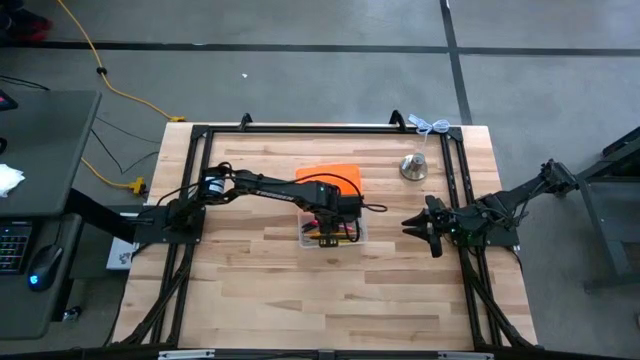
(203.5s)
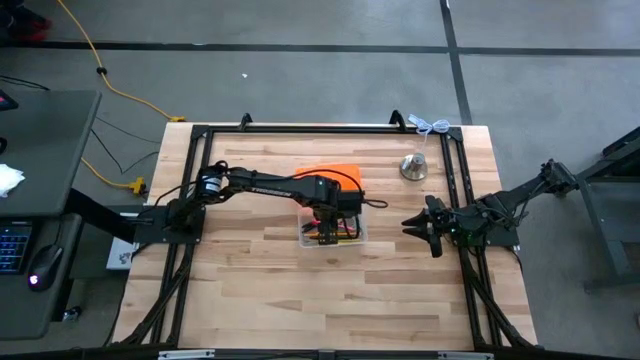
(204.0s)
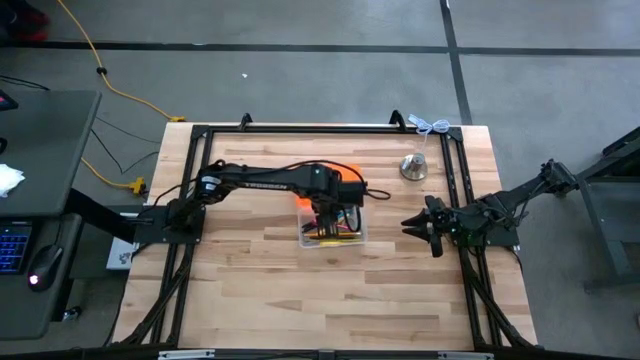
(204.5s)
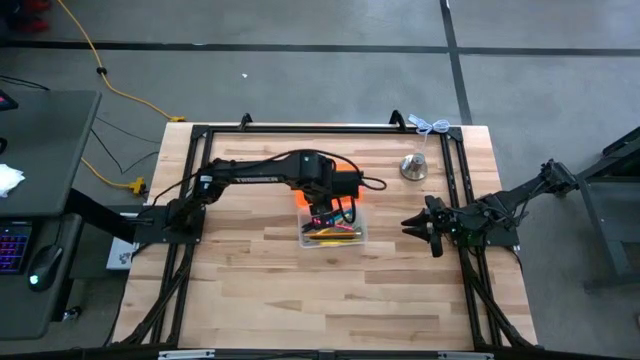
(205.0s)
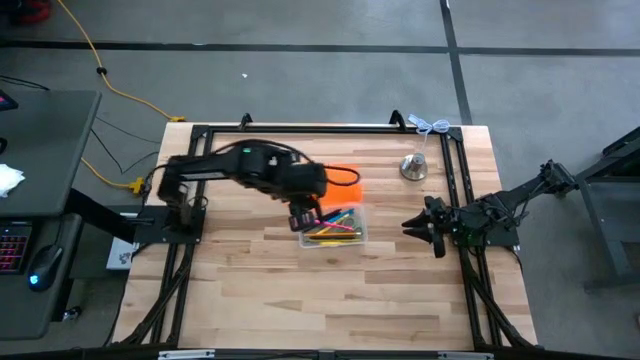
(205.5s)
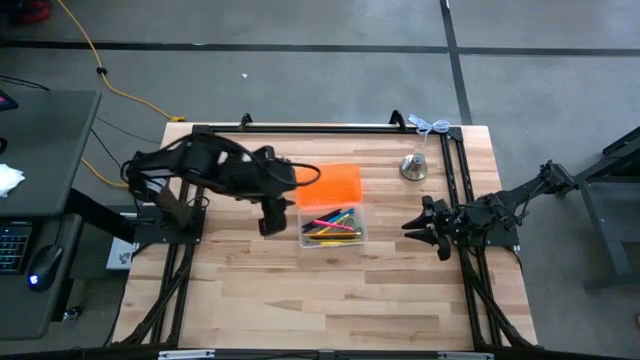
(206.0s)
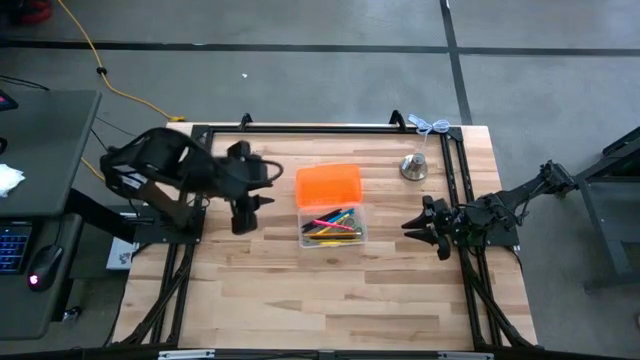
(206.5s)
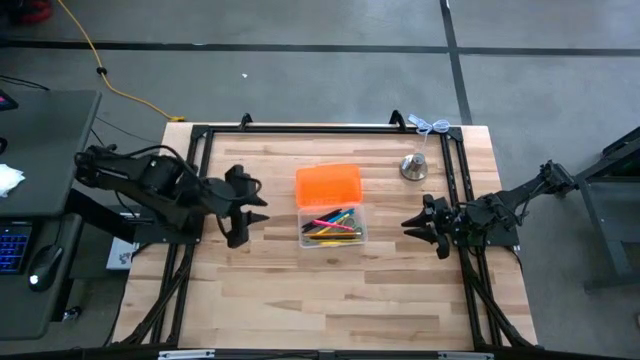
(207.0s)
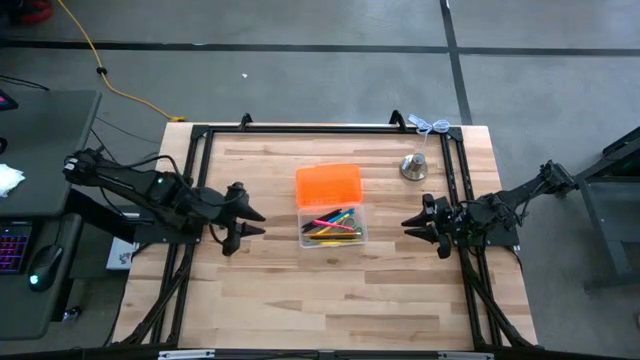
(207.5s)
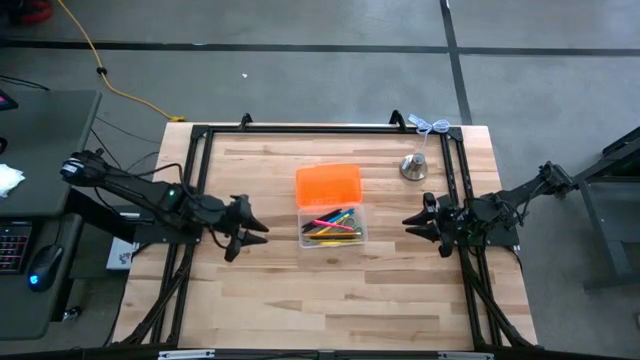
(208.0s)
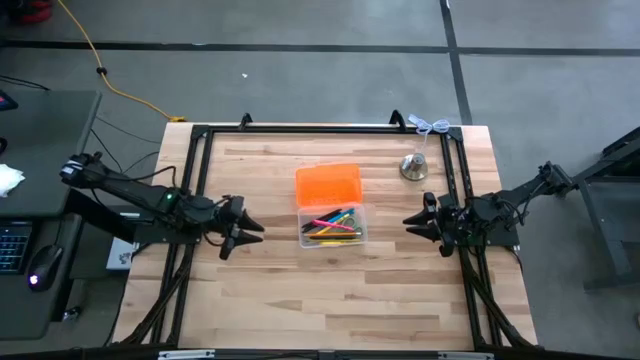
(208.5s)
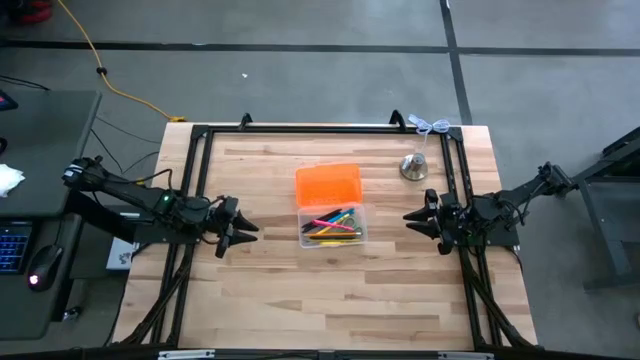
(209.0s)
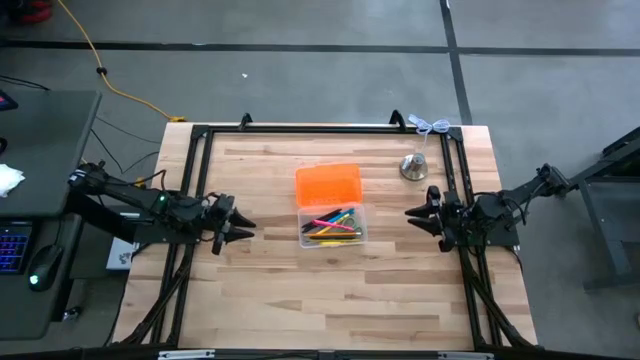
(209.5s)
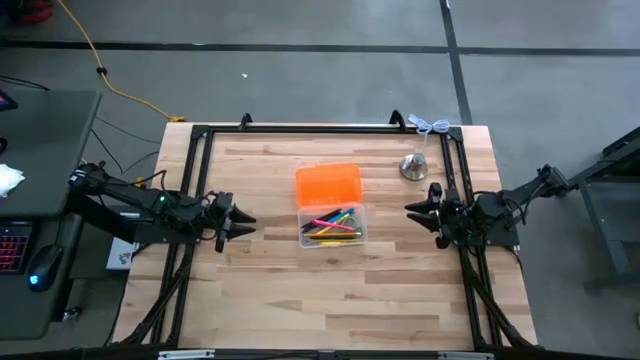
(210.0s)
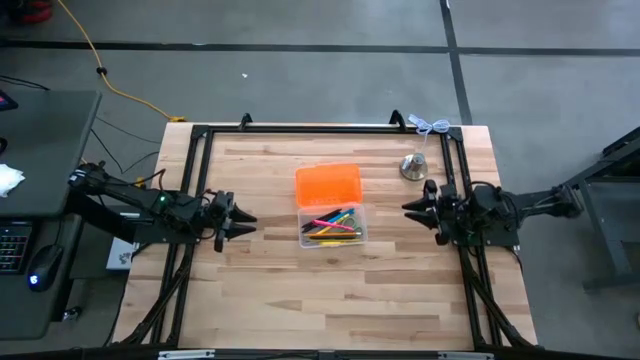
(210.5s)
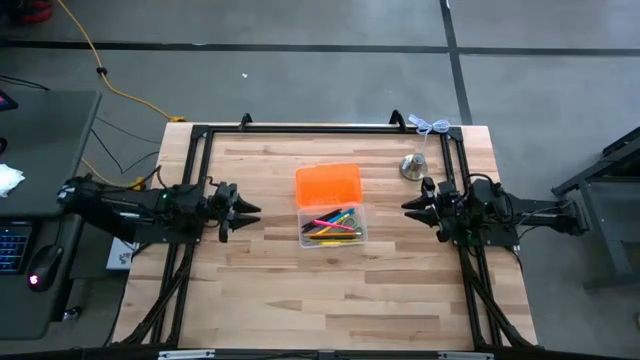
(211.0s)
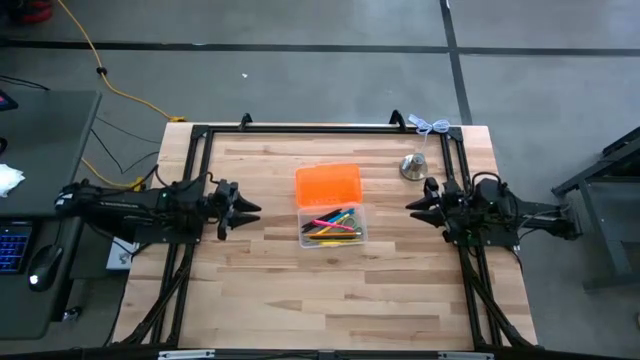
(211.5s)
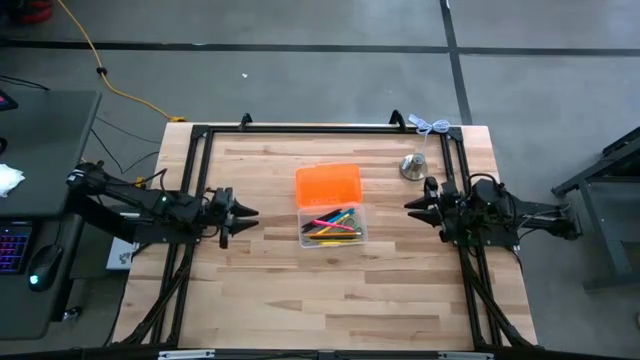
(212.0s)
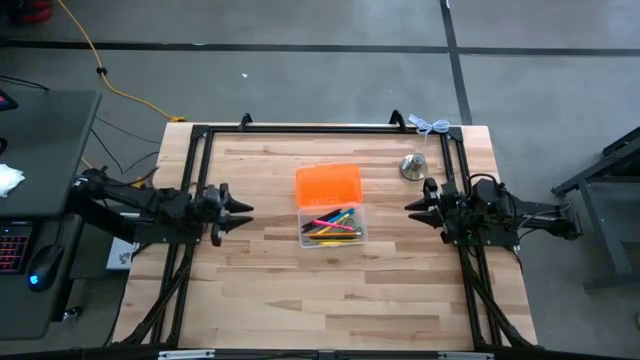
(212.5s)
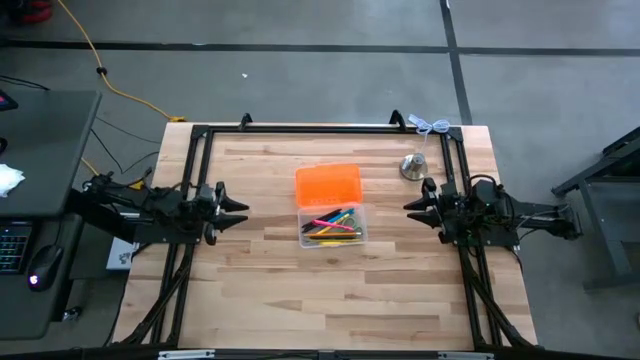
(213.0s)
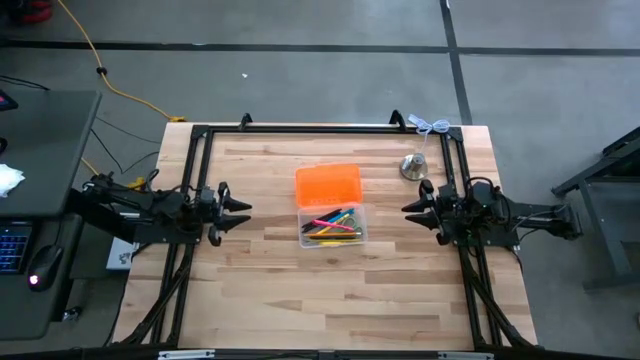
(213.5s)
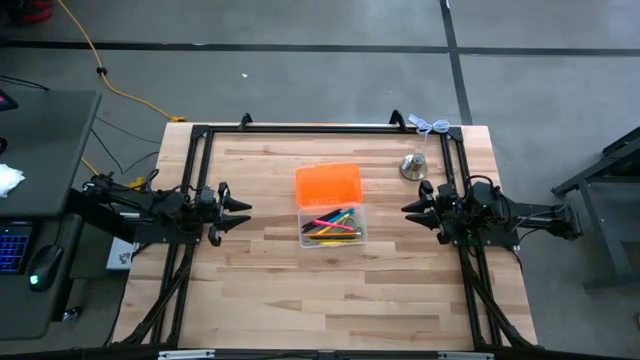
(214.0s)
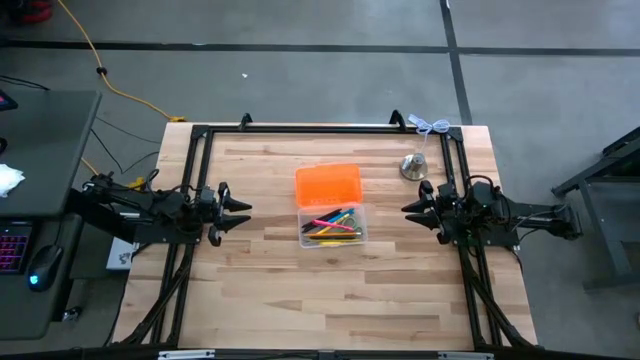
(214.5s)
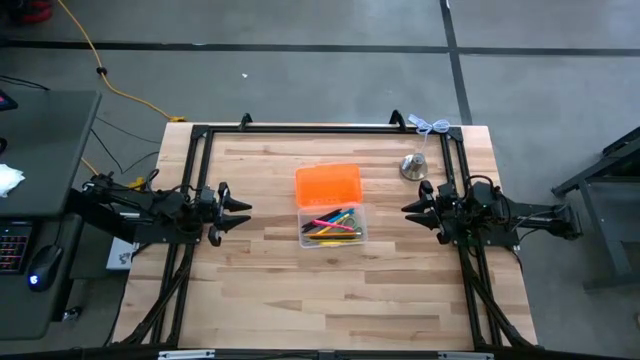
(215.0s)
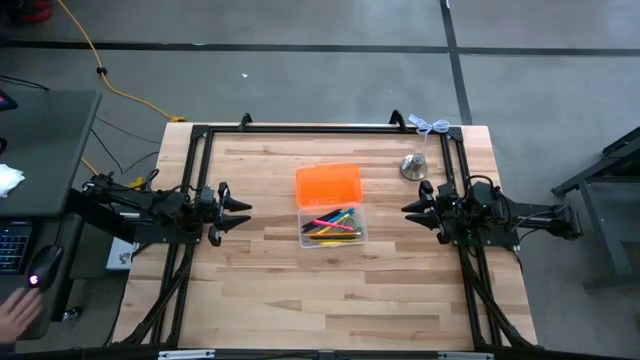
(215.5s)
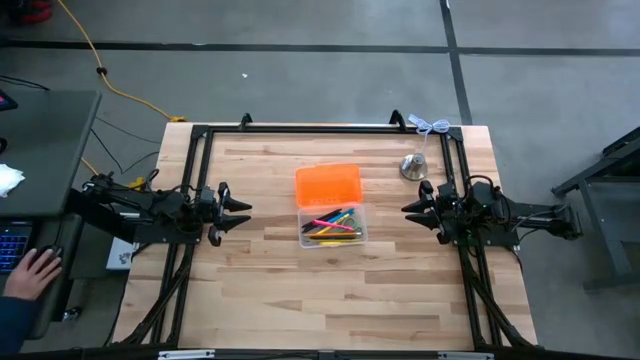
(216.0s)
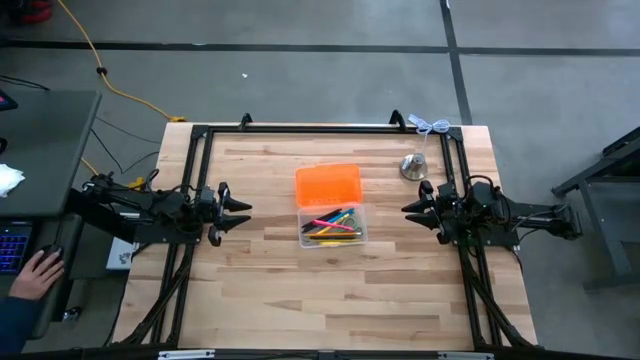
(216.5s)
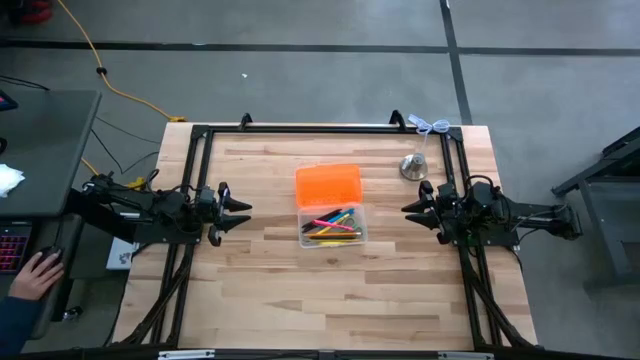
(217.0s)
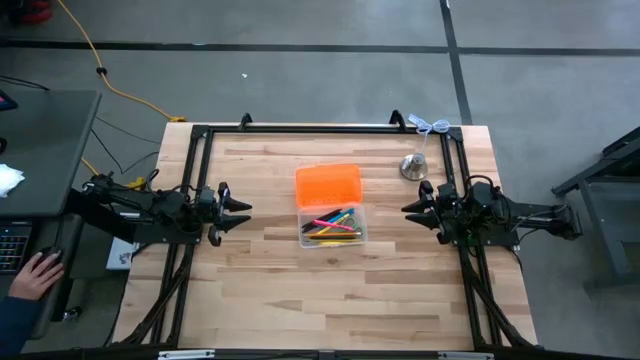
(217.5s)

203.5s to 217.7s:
Task: Pick & place school supplies into a supply box
Return to Home Position

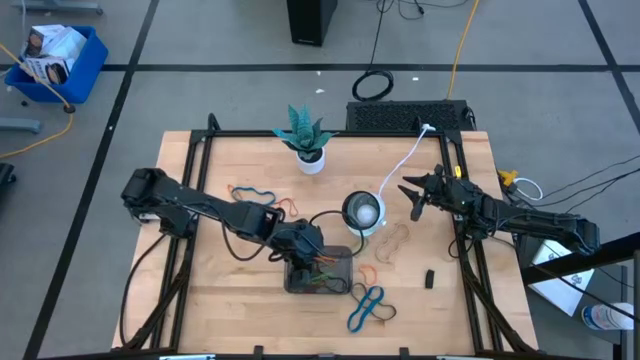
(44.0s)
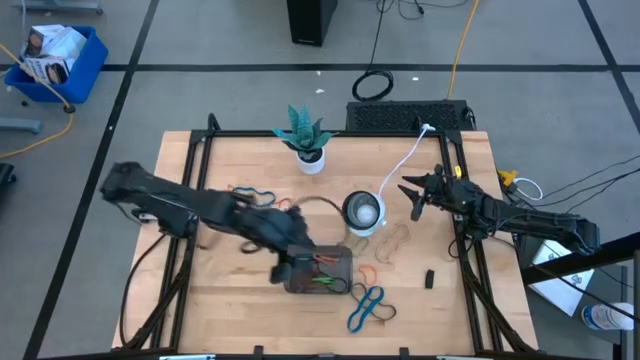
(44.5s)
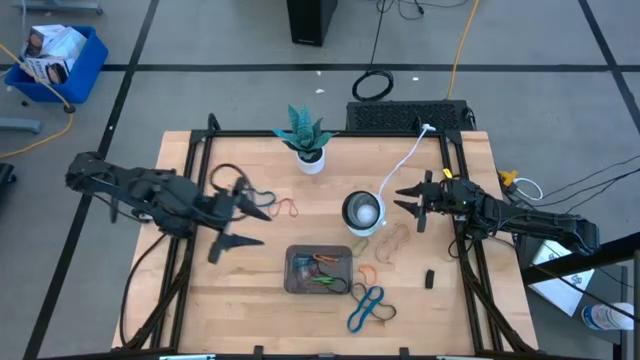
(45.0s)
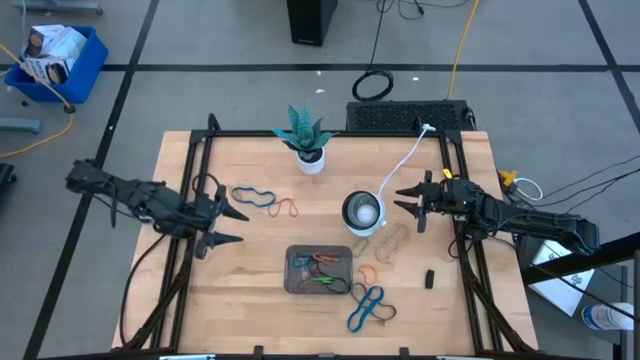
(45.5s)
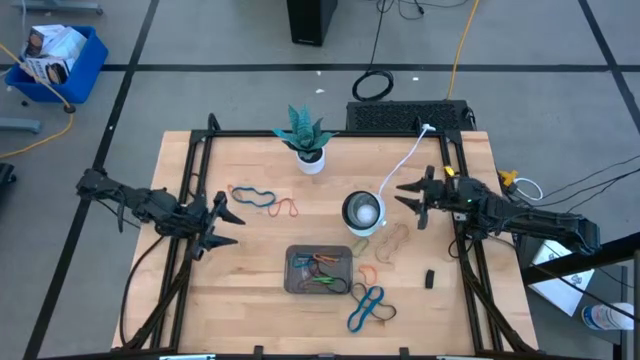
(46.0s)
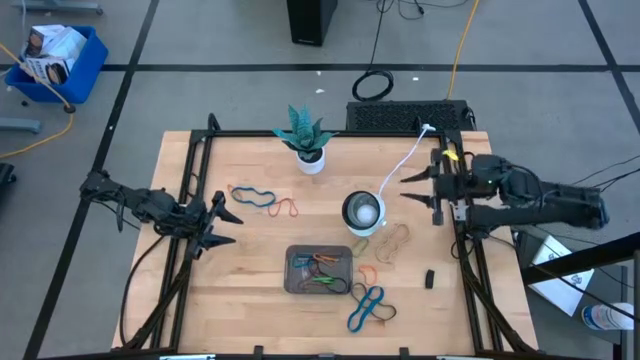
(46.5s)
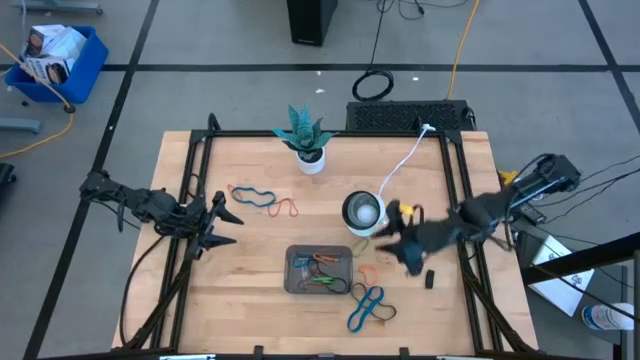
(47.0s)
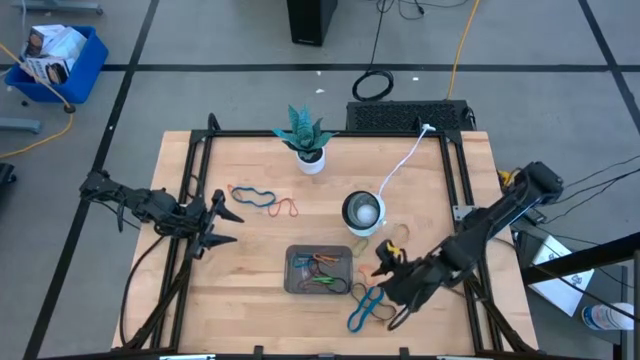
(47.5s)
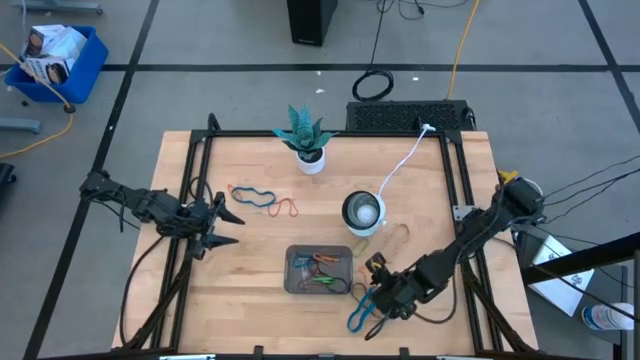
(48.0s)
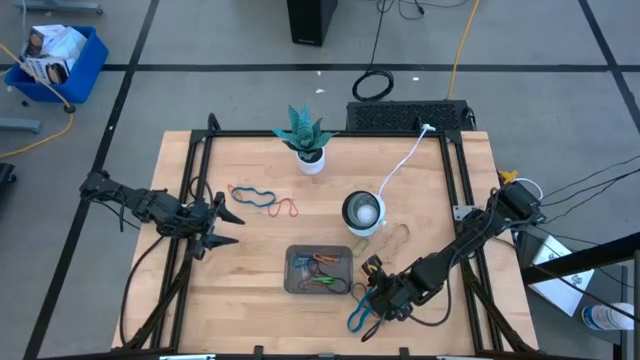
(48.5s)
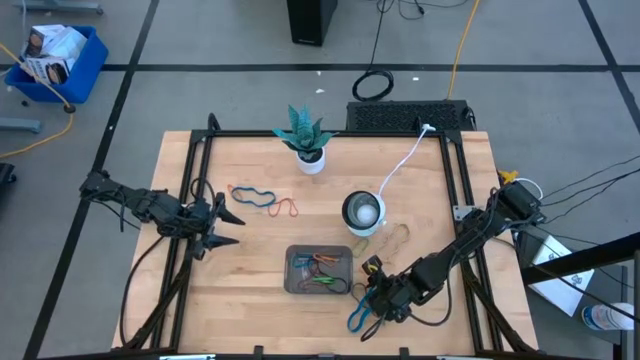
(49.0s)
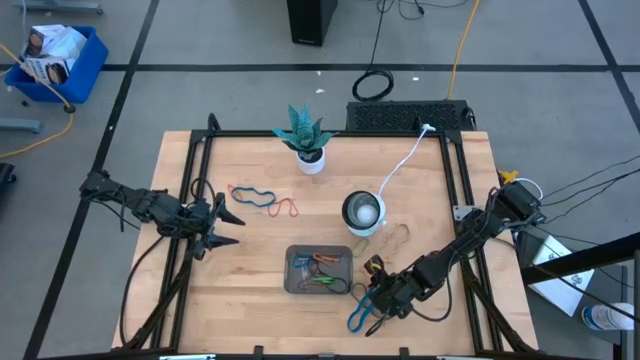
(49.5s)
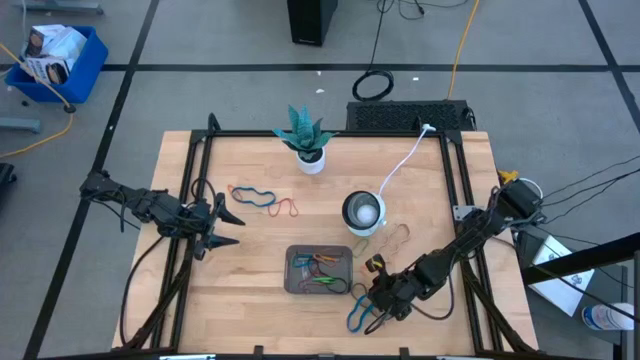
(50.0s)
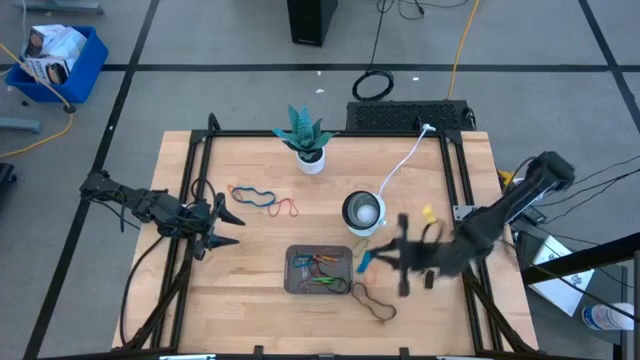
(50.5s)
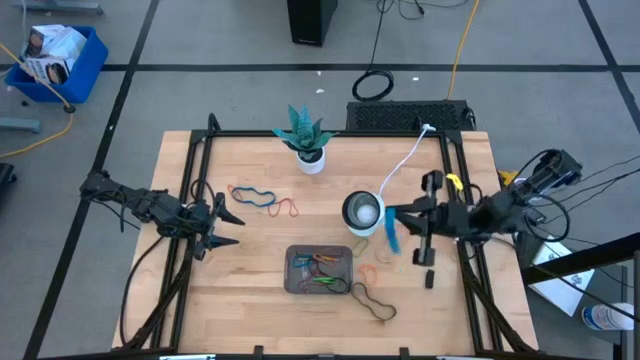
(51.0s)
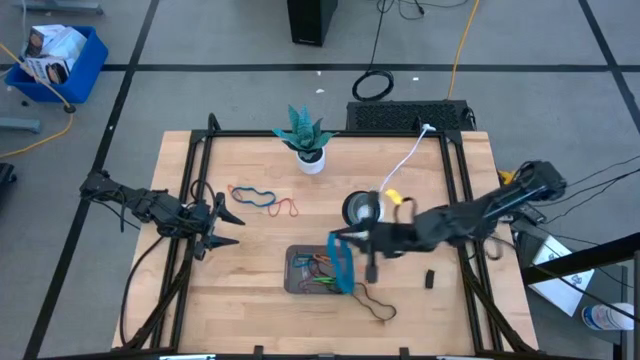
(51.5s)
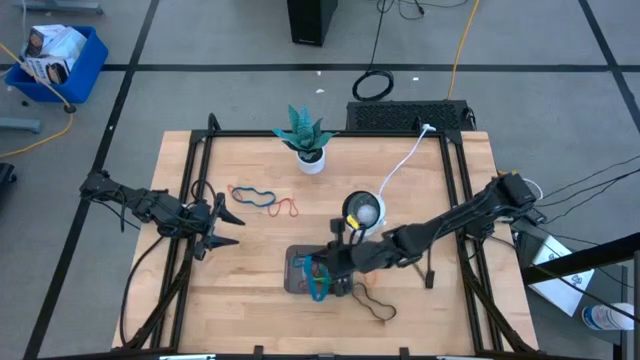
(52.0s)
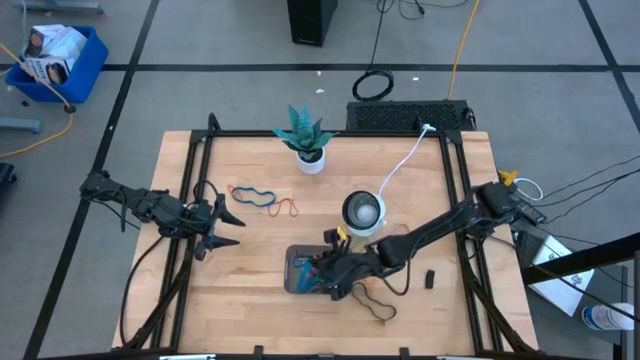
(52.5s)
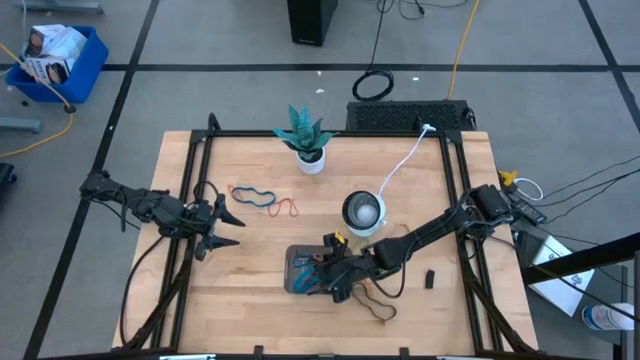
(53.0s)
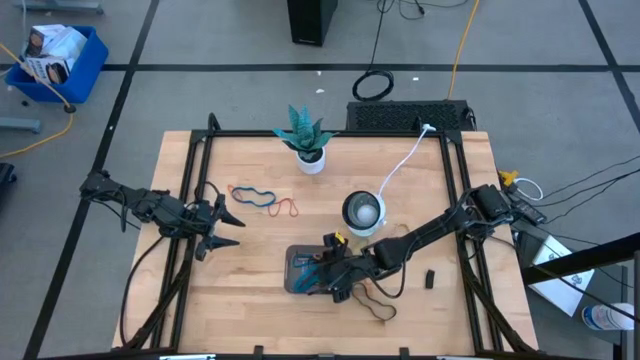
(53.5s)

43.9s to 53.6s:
Task: Pick and place rubber bands into bin
Put the bottom blue rubber band into the gray bin
